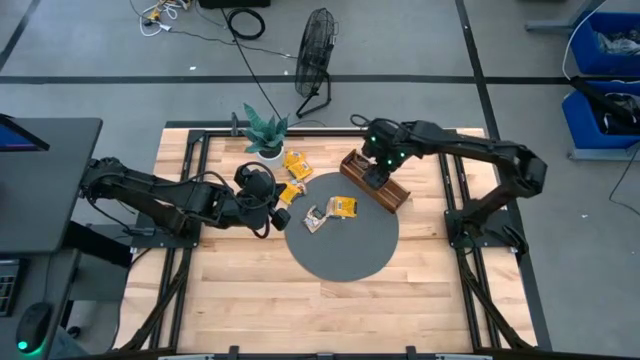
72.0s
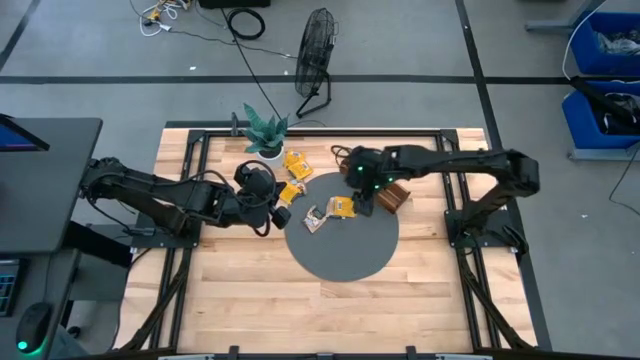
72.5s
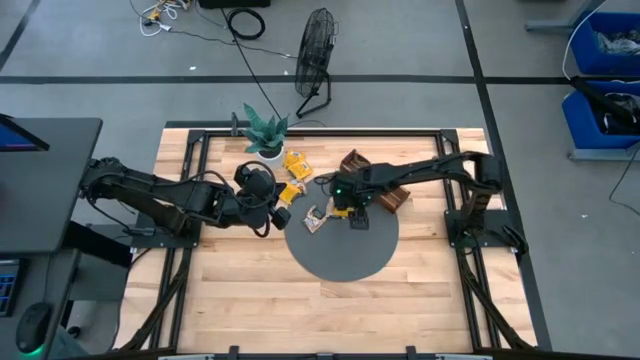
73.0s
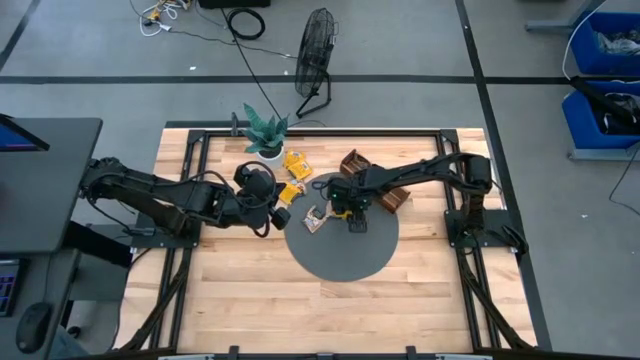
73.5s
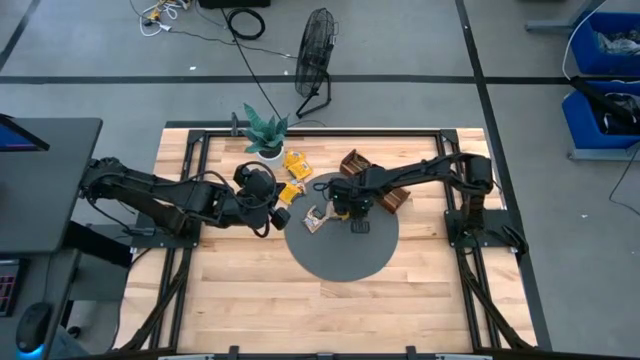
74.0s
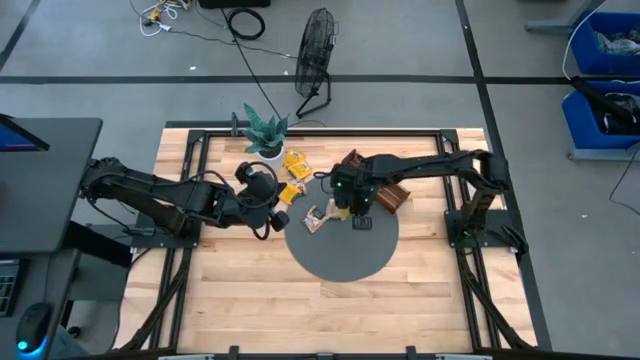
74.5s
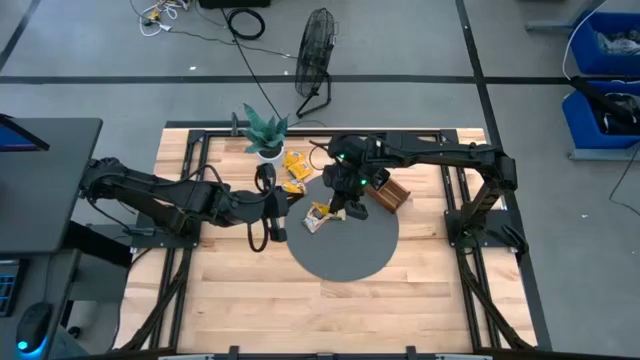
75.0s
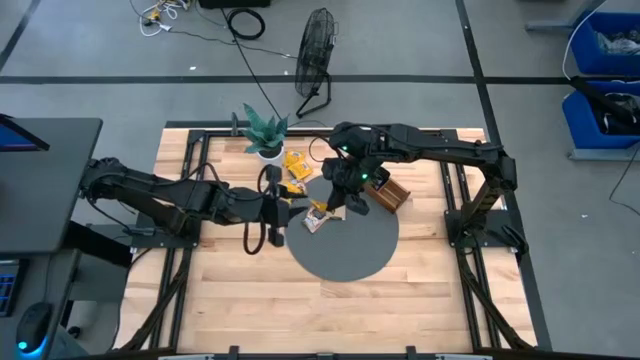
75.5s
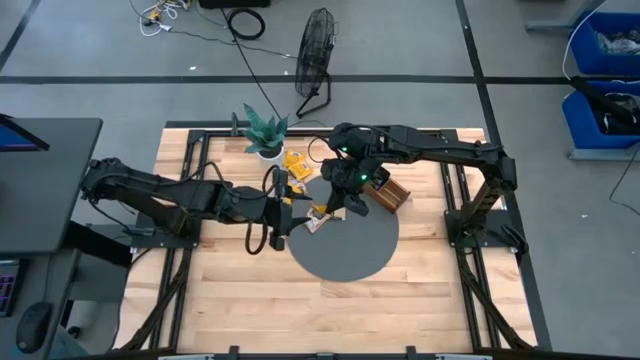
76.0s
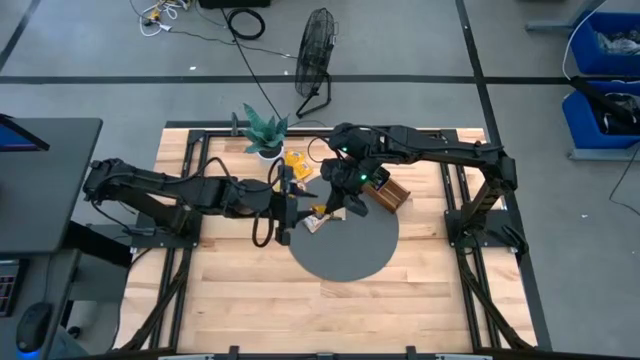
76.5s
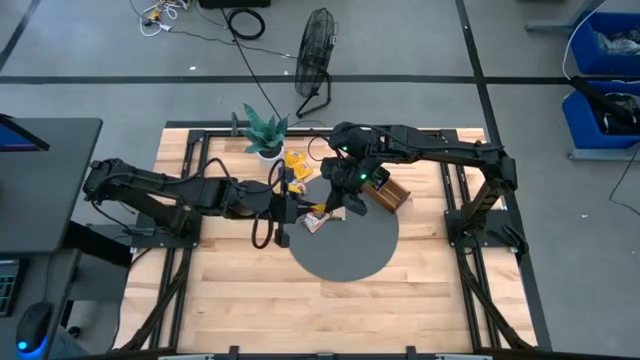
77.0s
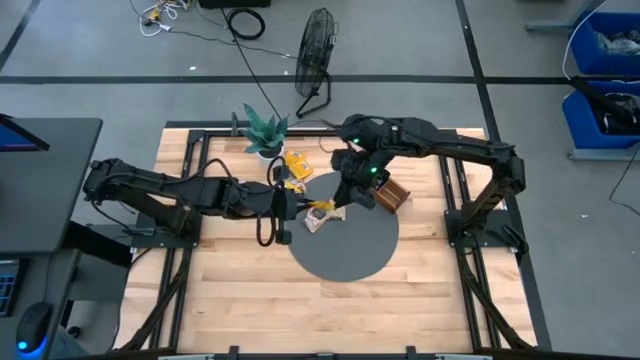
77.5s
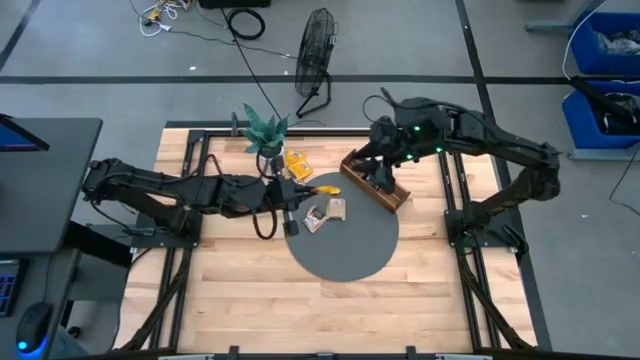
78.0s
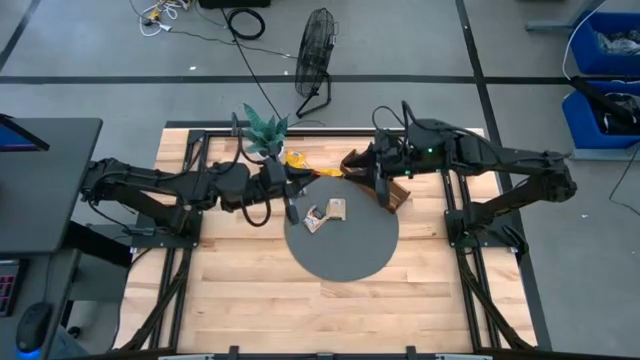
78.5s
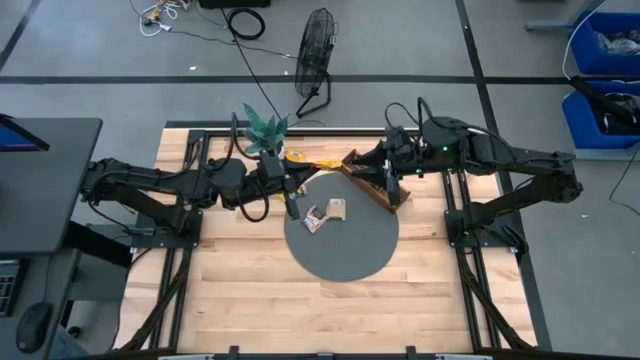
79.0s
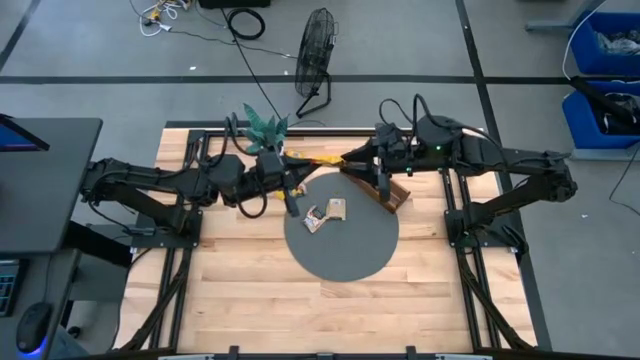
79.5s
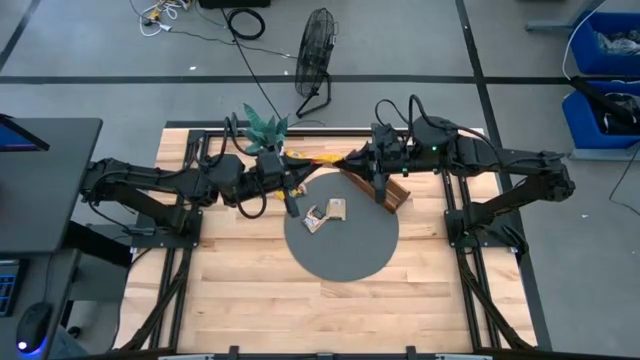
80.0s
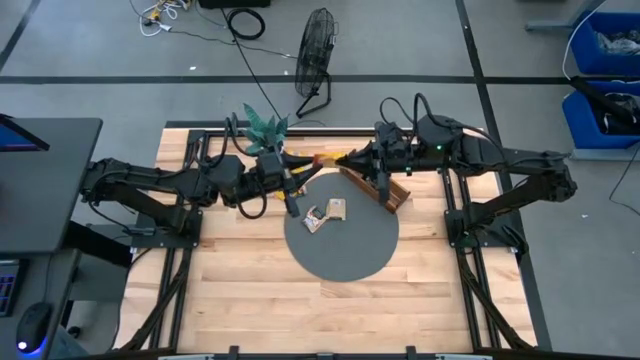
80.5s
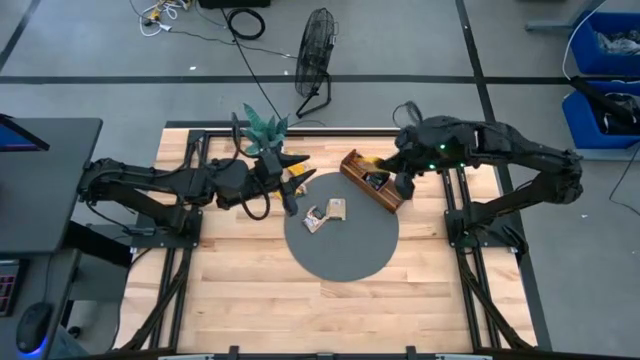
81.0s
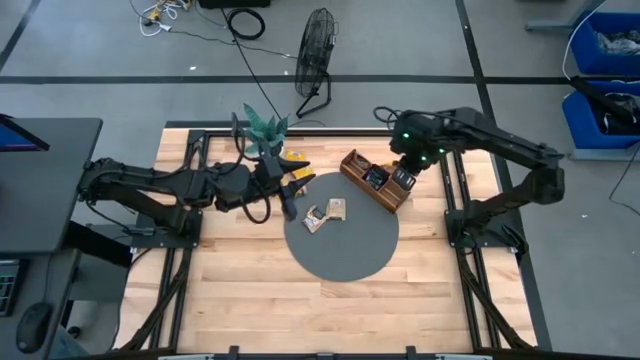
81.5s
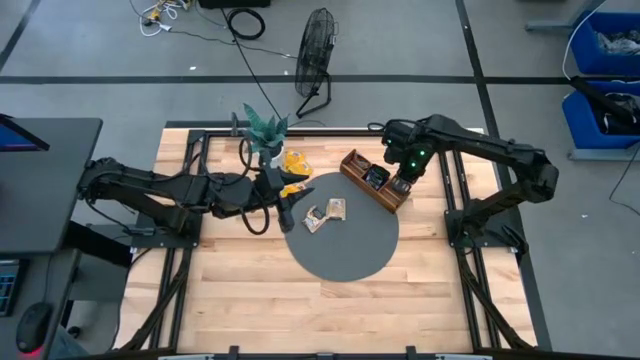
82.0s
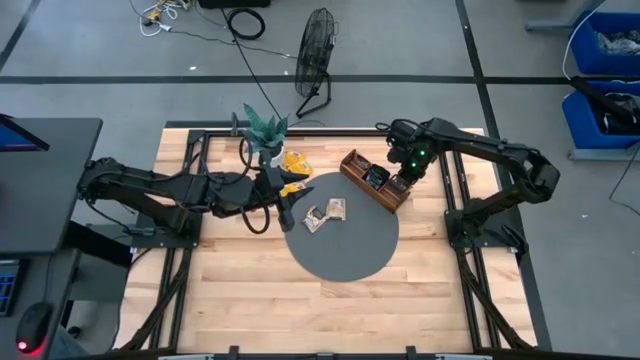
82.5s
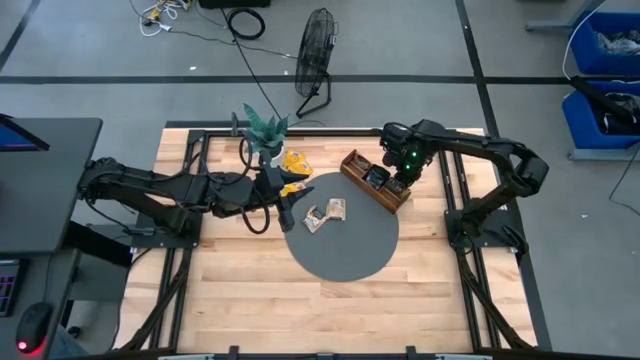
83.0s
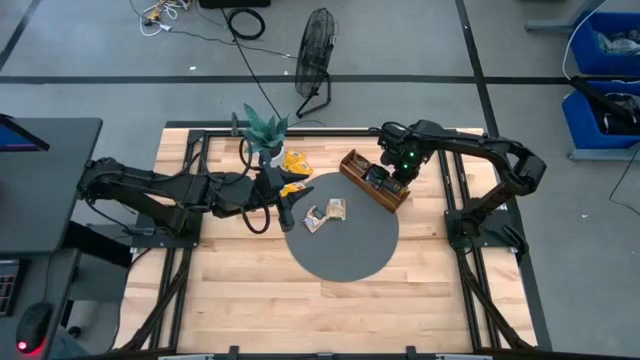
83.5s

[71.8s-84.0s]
Task: Pick & Place Tea
Put the yellow tea bag into the right section of the wooden organizer

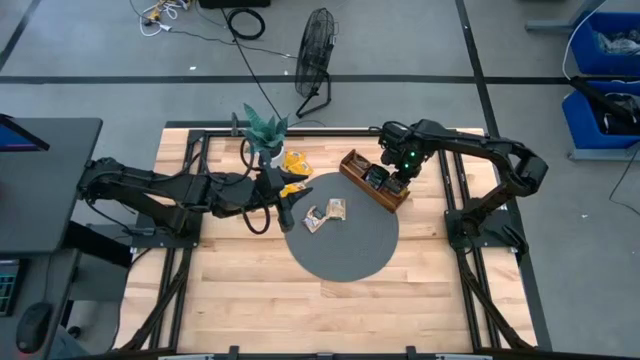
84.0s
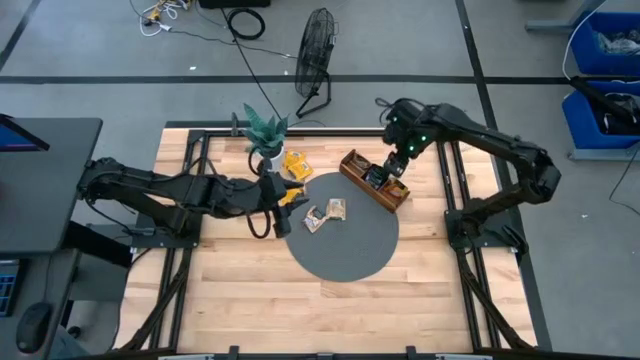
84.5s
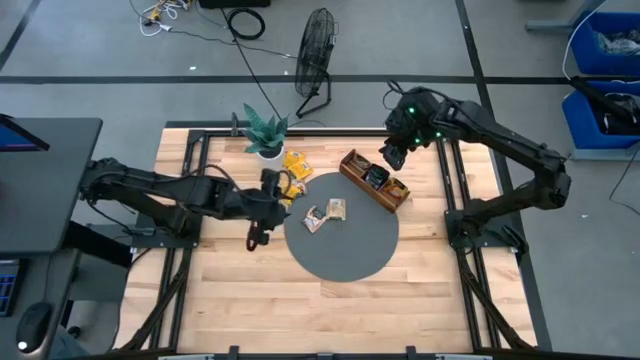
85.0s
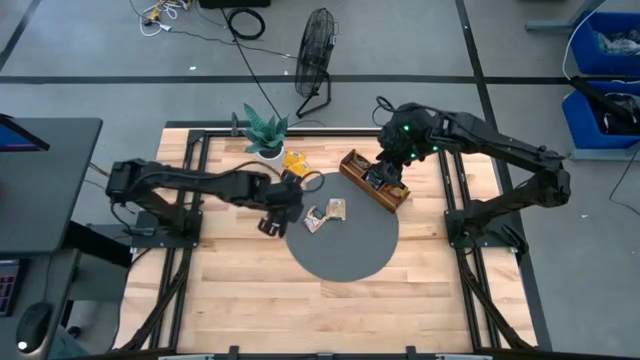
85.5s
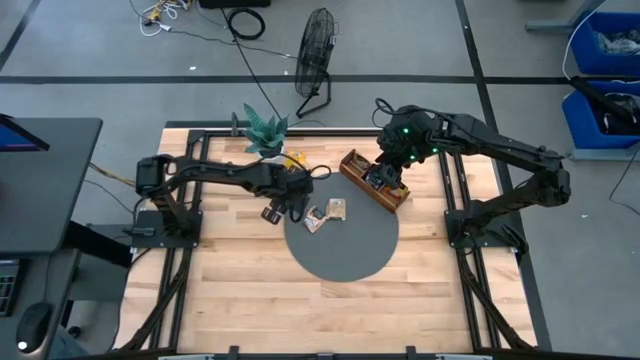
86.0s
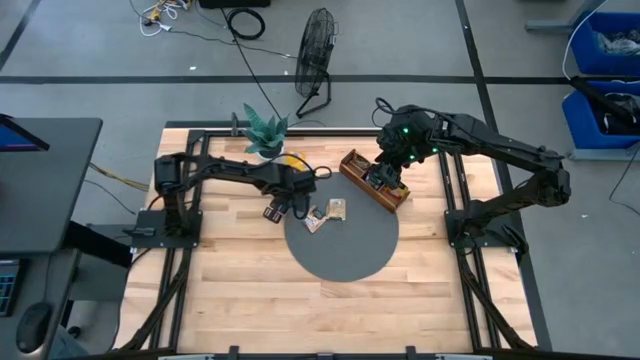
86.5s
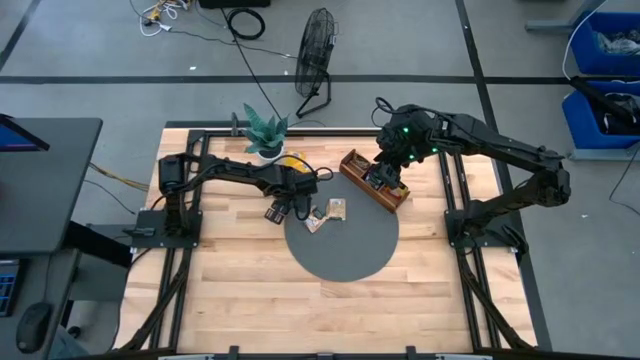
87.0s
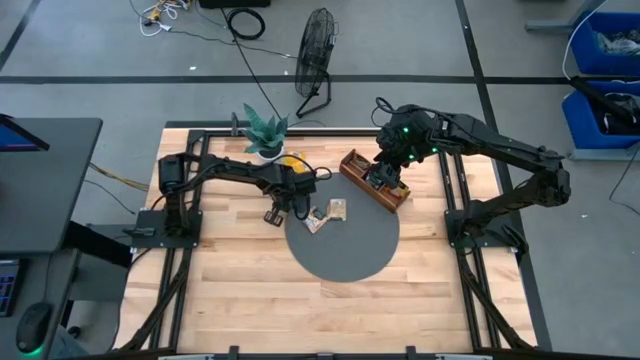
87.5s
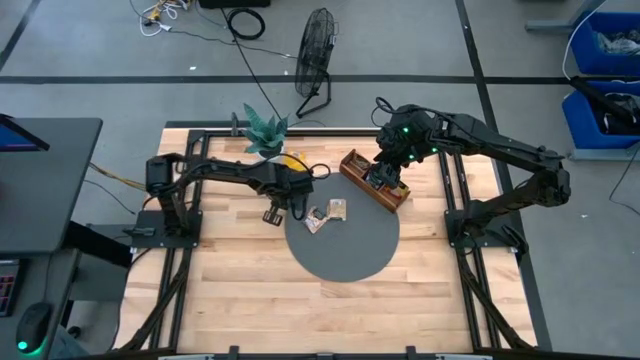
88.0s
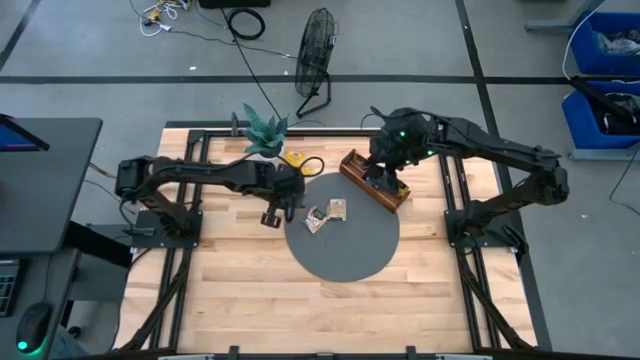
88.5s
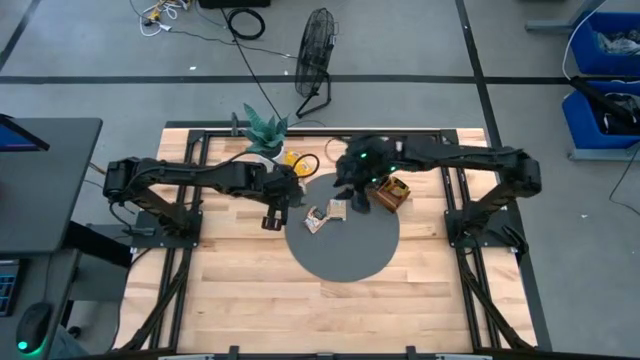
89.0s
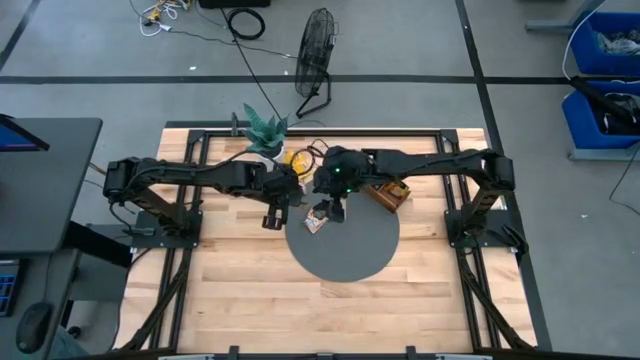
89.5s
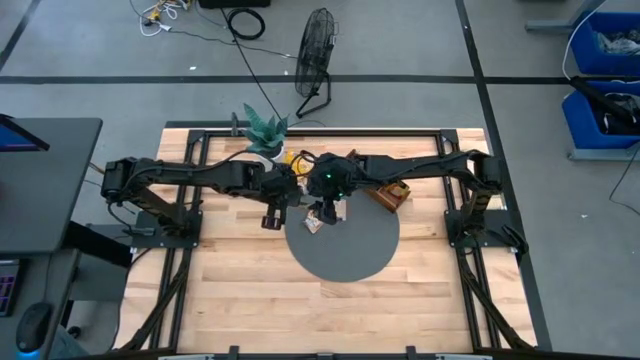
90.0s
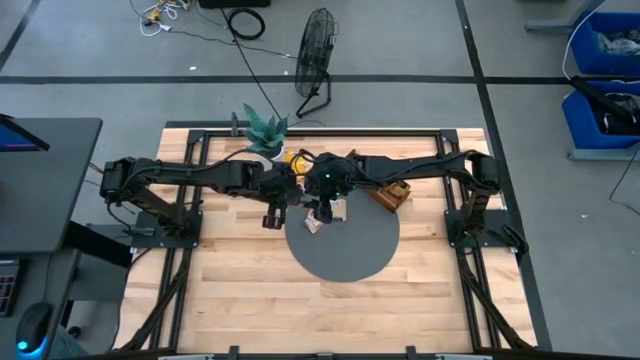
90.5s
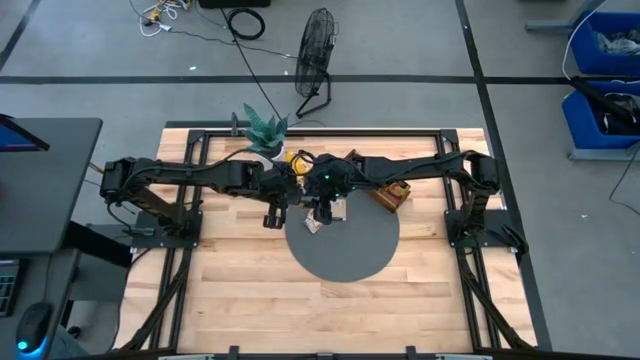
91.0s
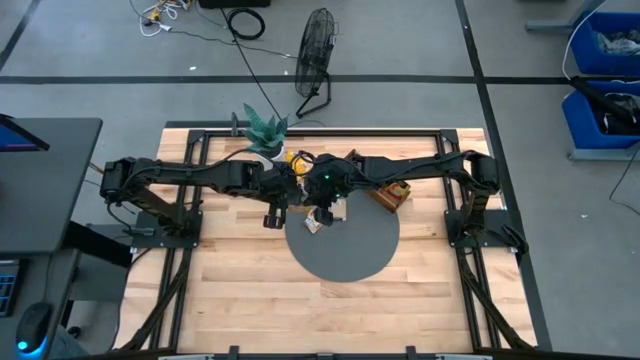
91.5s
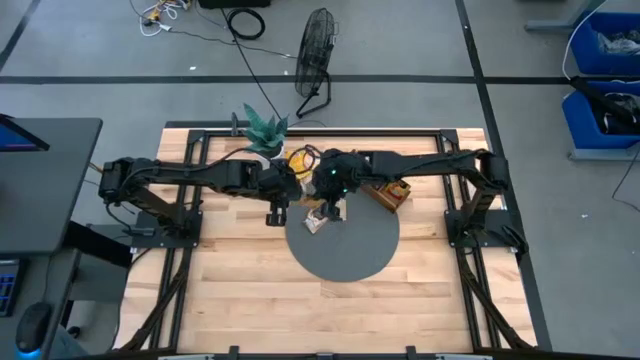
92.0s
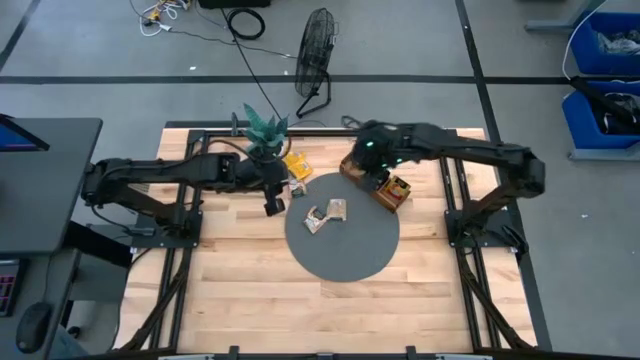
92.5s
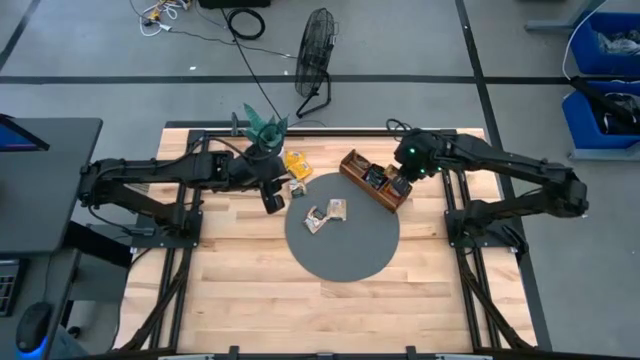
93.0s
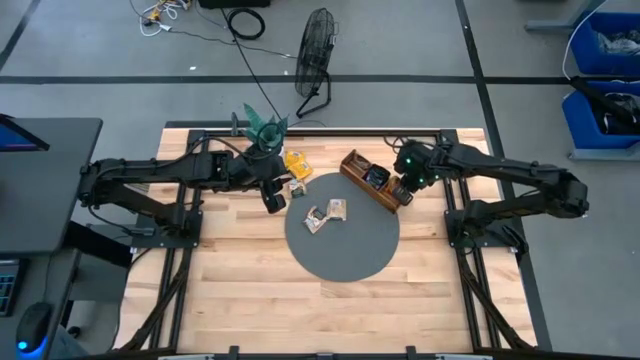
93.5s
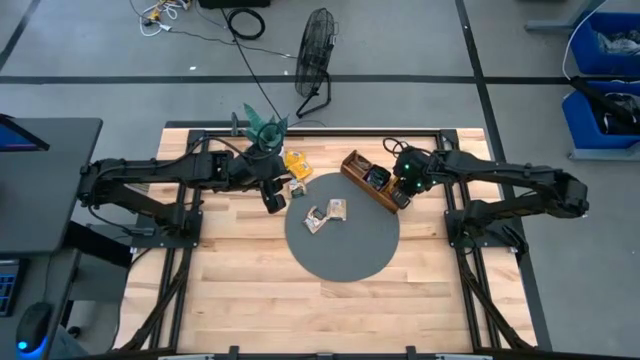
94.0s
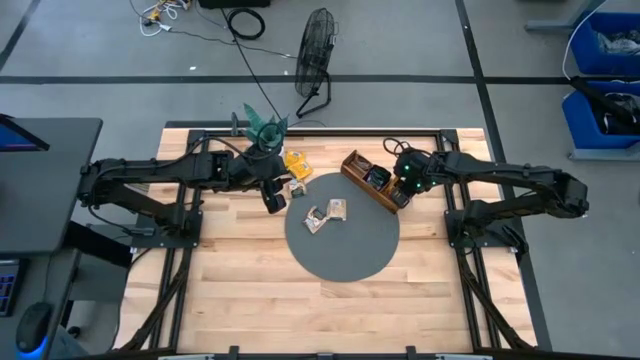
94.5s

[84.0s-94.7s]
Put the yellow tea bag into the right section of the wooden organizer
